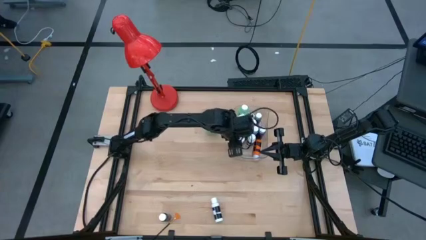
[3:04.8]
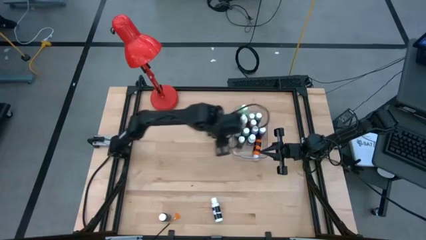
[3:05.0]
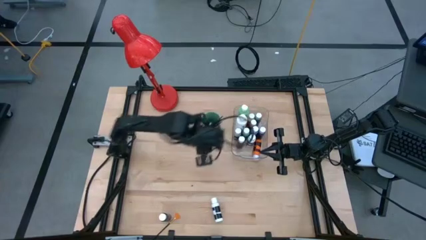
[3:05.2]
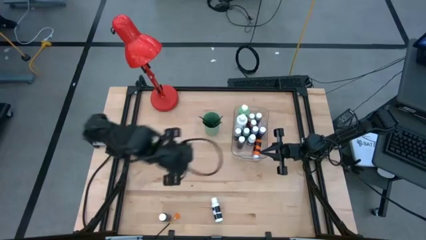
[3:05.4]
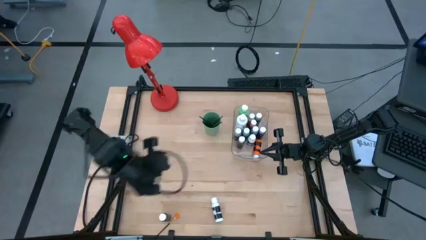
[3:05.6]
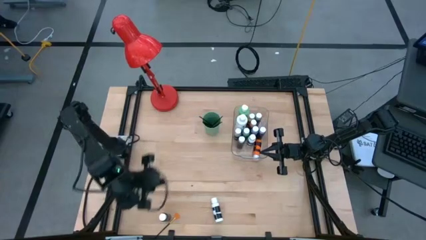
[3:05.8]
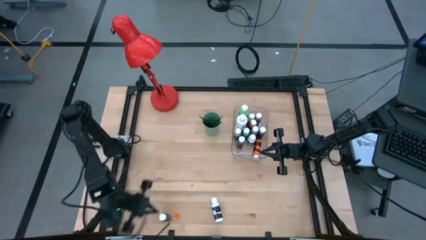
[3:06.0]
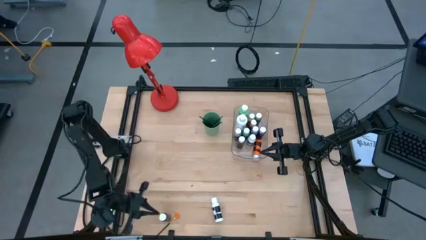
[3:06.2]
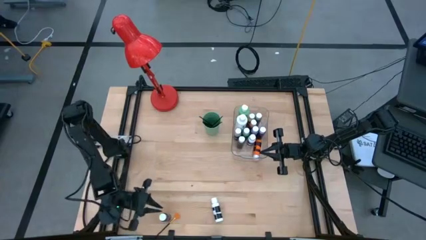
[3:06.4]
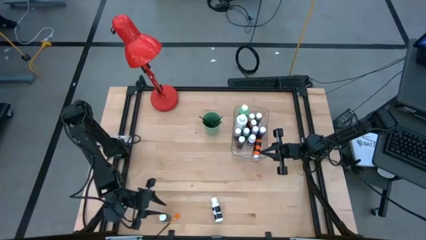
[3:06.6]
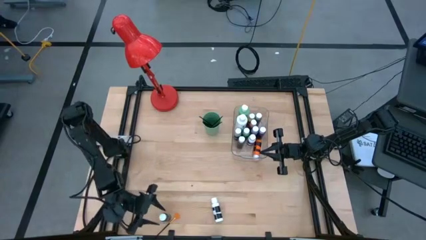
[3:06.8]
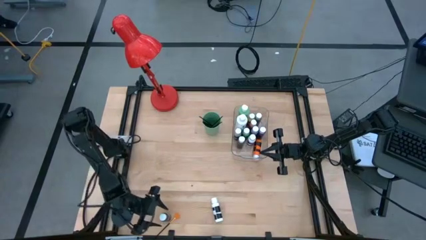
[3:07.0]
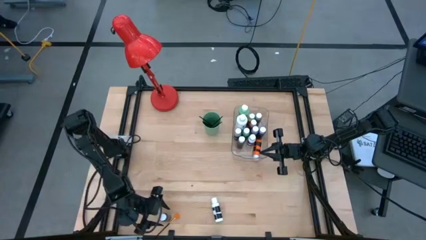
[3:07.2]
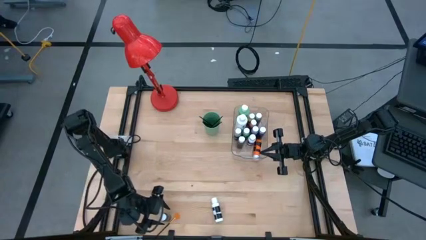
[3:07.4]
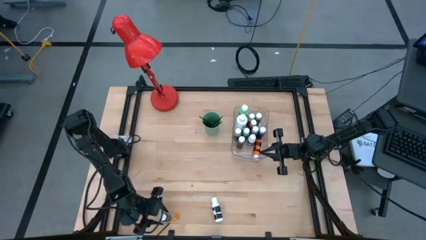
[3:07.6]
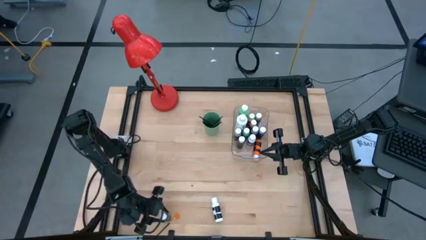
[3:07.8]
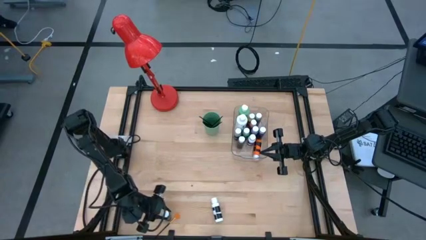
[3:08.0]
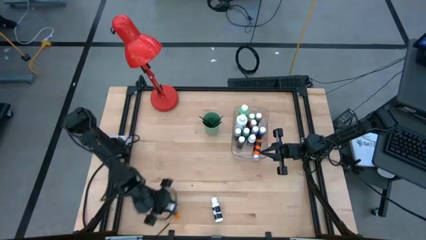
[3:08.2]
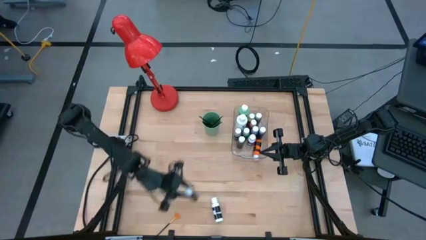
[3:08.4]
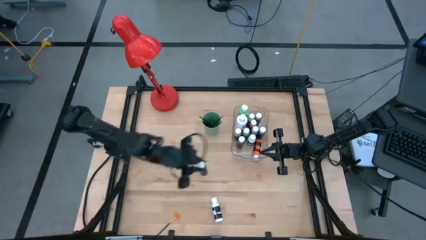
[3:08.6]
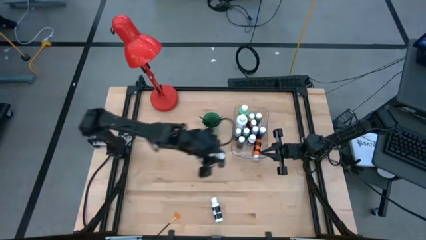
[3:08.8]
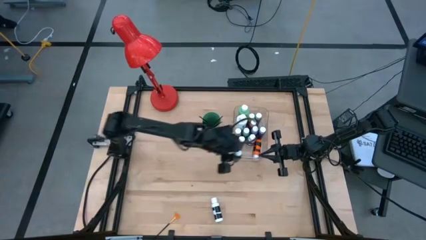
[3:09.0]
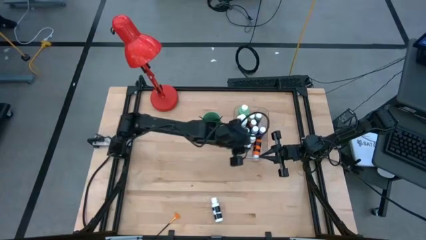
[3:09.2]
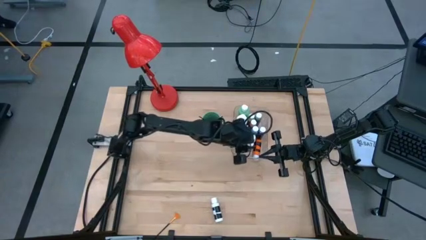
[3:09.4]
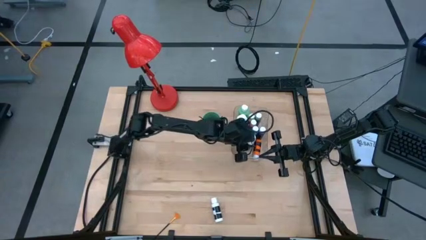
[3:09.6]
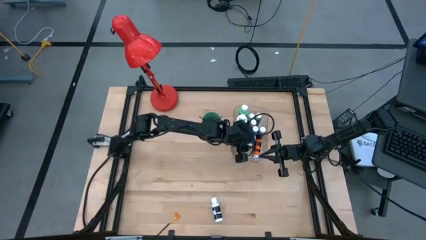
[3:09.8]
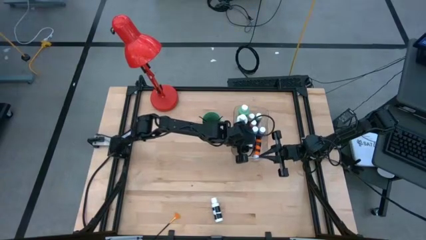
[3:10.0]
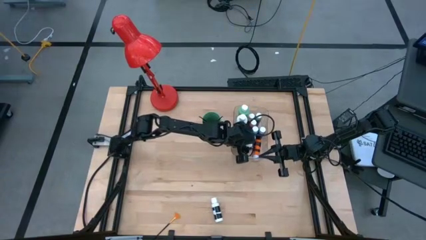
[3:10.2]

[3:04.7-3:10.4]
Task: Pick & Place Paint Supplies
Put the black paint bottle into the transparent bin

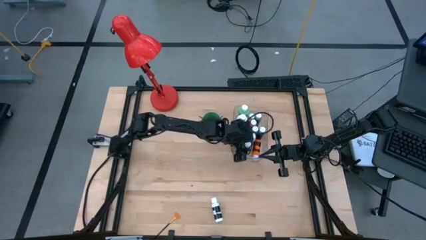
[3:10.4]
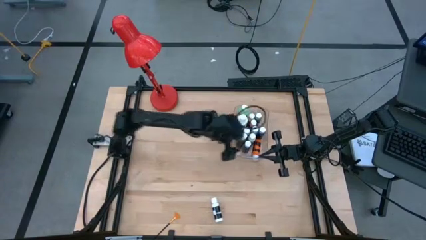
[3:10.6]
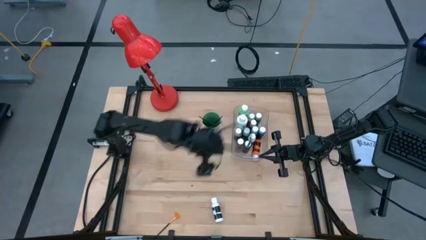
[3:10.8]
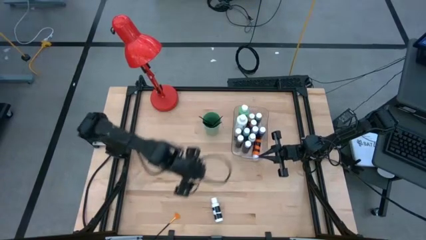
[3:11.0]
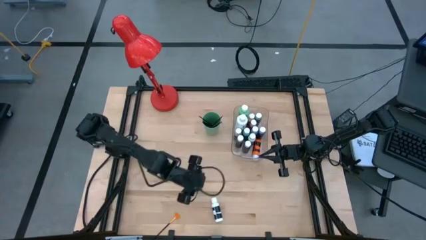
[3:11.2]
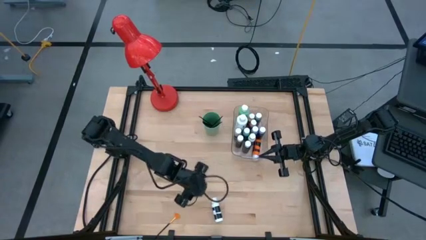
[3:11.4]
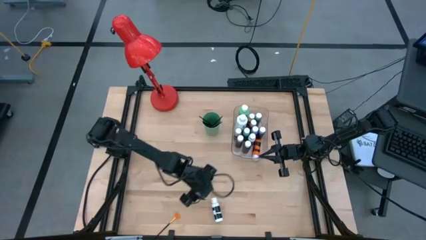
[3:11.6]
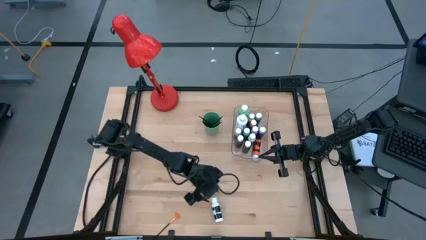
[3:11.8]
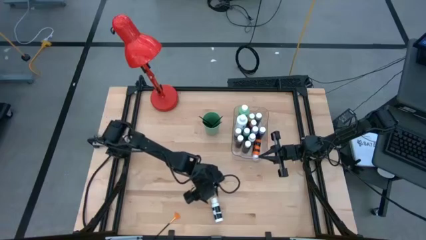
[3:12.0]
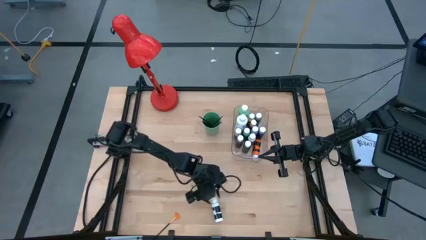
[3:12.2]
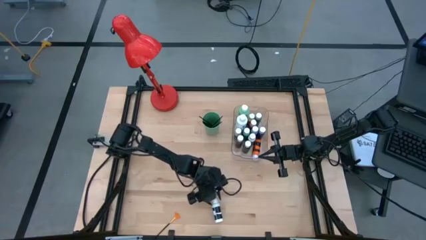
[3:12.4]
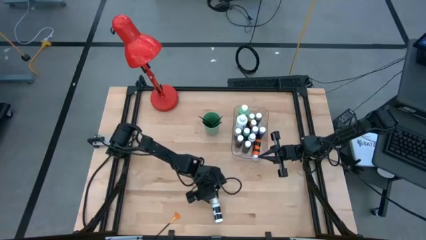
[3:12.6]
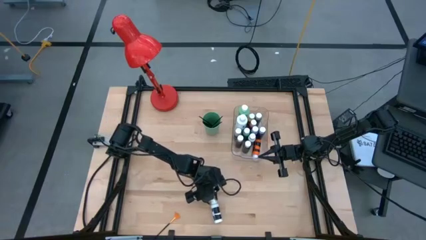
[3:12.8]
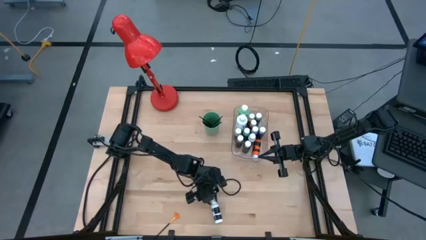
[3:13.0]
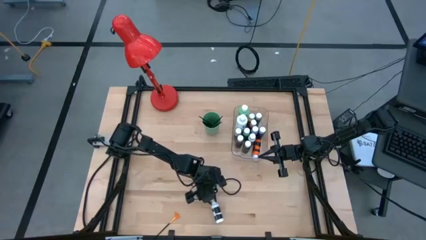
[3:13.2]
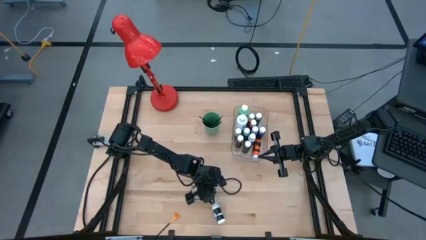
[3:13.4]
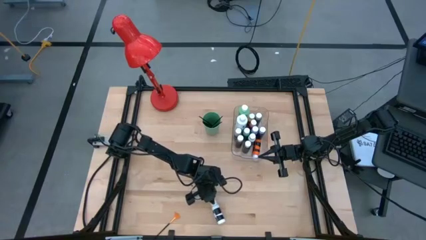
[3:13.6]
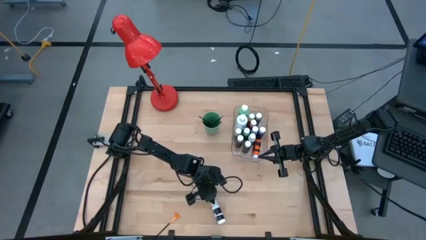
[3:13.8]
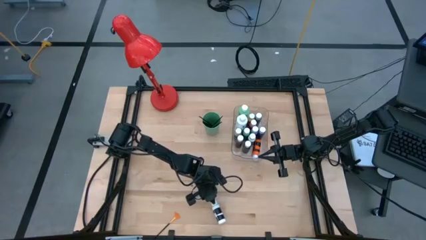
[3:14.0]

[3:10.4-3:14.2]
Put the white paint bottle into the transparent bin
